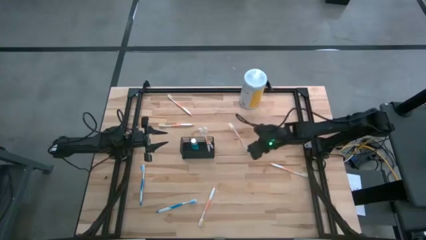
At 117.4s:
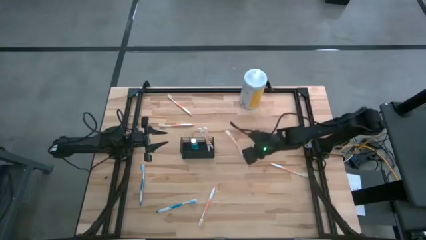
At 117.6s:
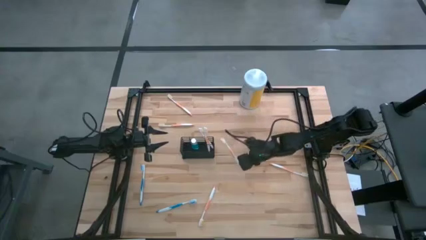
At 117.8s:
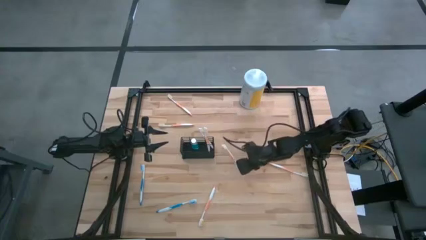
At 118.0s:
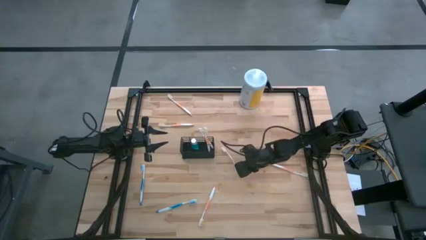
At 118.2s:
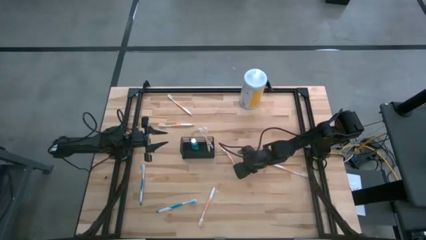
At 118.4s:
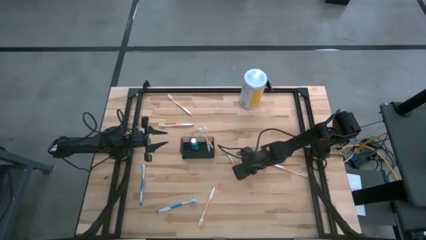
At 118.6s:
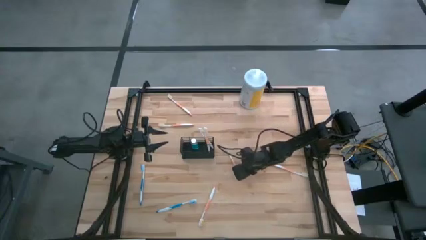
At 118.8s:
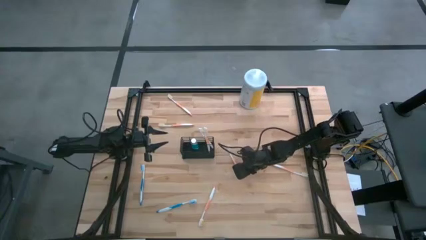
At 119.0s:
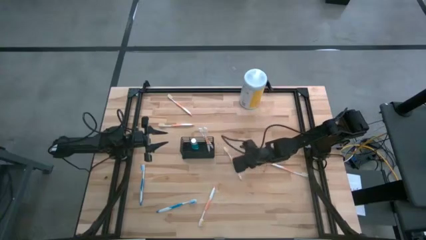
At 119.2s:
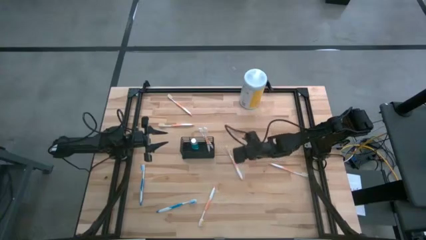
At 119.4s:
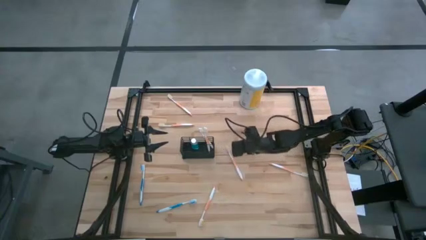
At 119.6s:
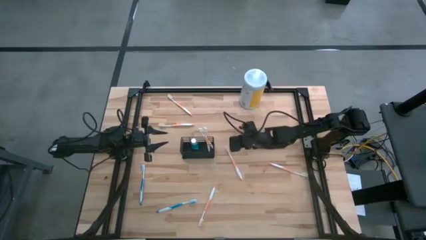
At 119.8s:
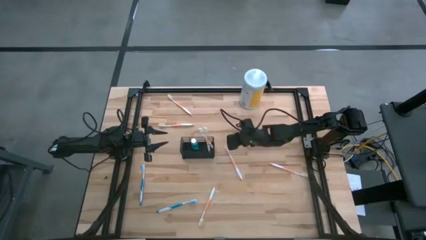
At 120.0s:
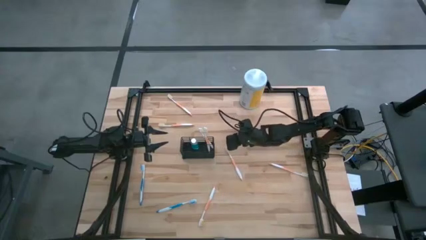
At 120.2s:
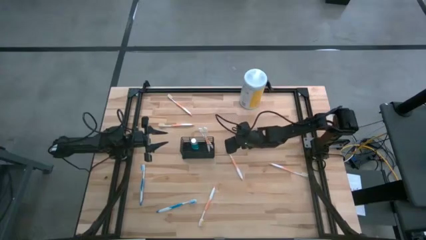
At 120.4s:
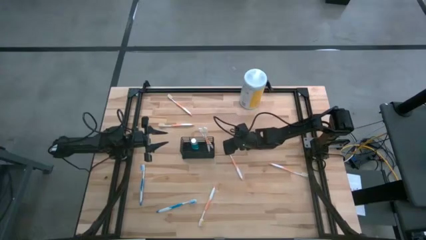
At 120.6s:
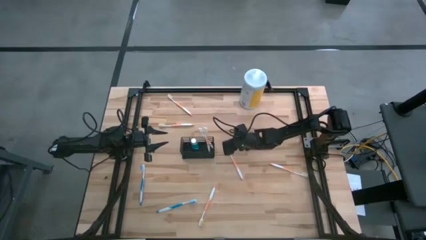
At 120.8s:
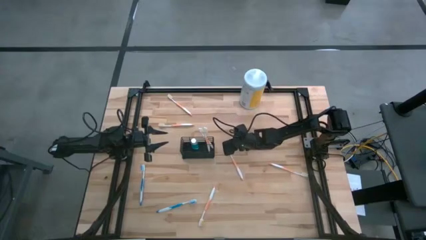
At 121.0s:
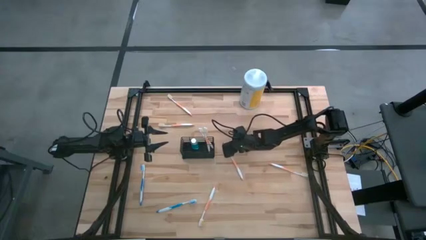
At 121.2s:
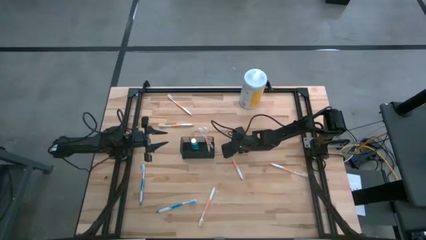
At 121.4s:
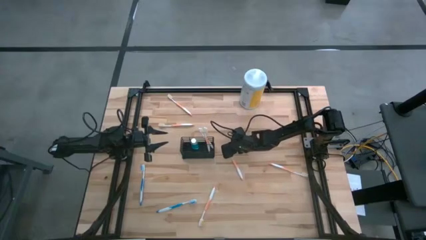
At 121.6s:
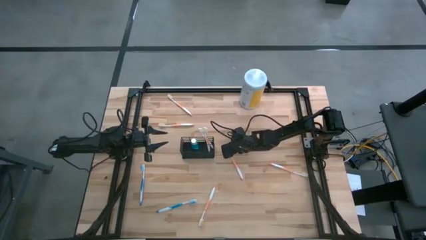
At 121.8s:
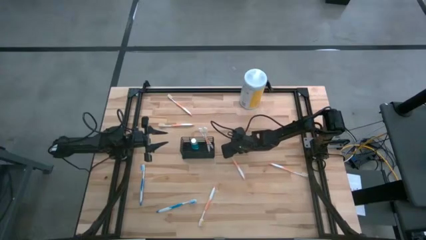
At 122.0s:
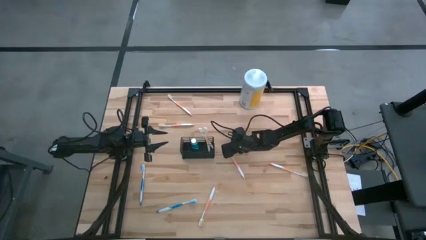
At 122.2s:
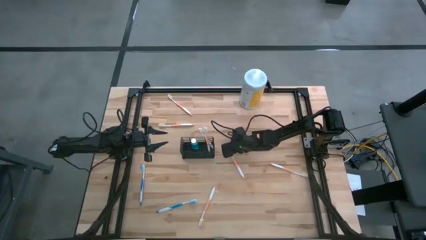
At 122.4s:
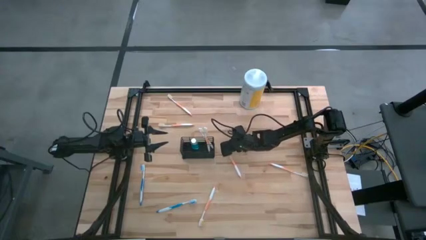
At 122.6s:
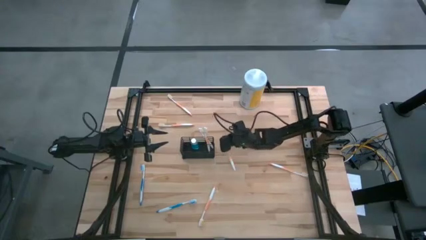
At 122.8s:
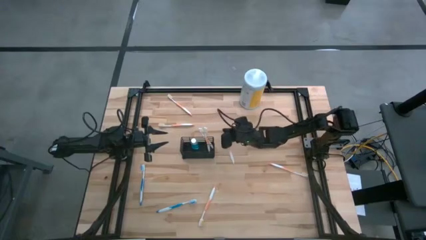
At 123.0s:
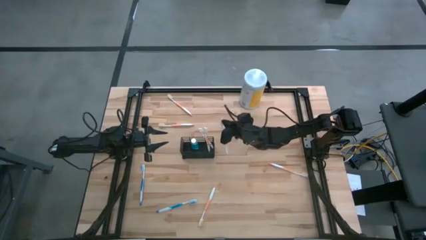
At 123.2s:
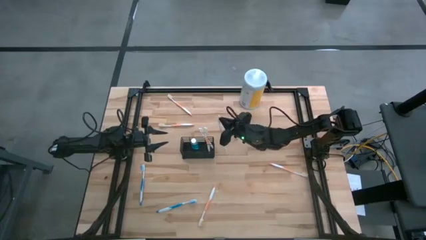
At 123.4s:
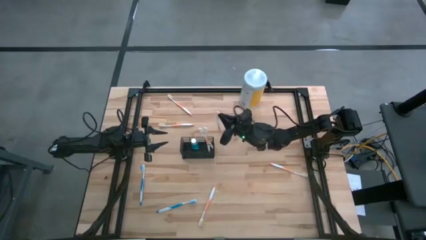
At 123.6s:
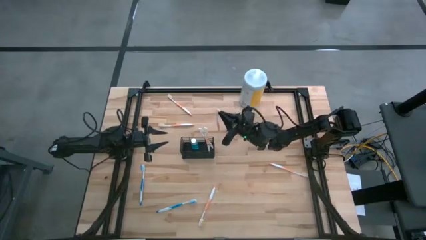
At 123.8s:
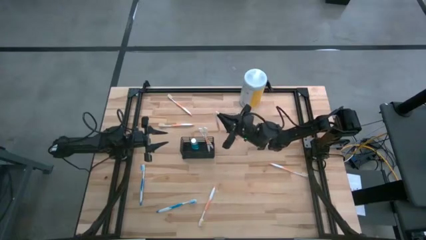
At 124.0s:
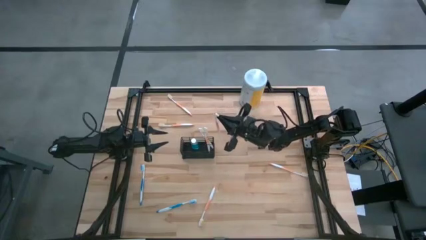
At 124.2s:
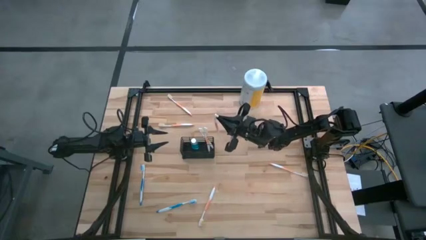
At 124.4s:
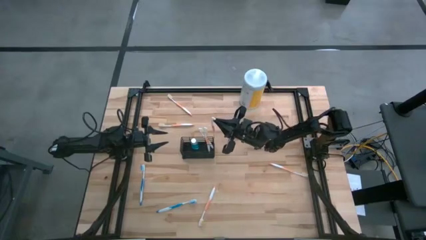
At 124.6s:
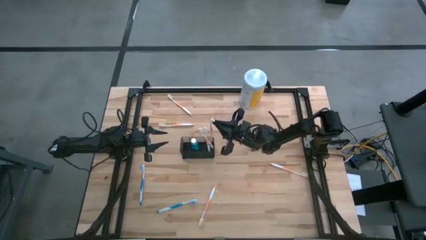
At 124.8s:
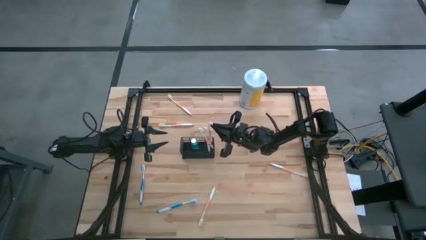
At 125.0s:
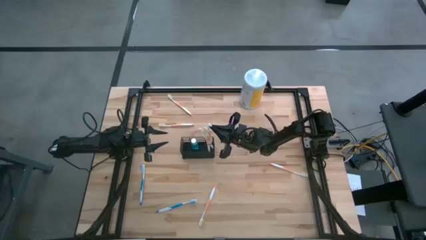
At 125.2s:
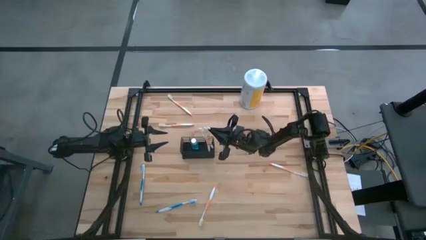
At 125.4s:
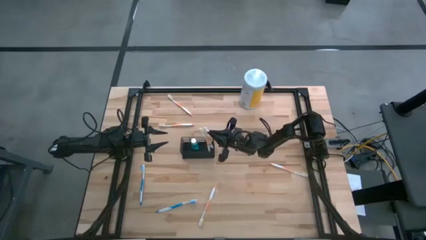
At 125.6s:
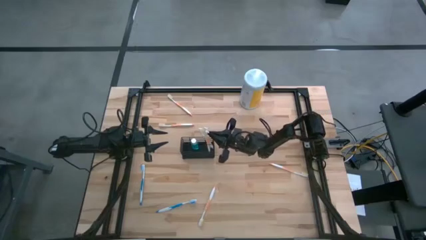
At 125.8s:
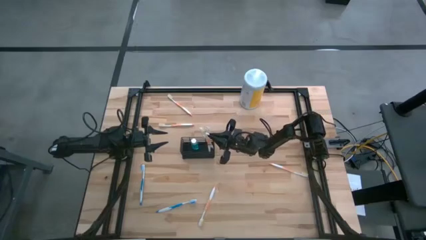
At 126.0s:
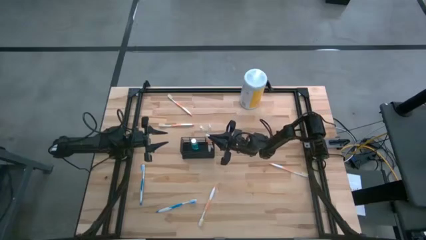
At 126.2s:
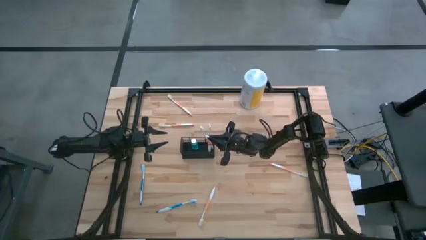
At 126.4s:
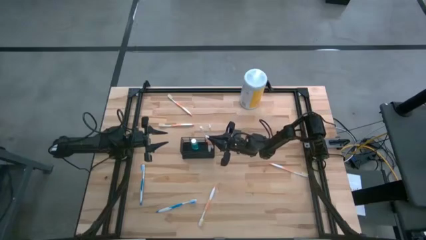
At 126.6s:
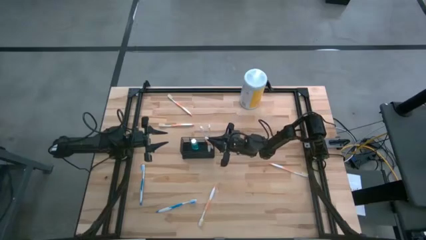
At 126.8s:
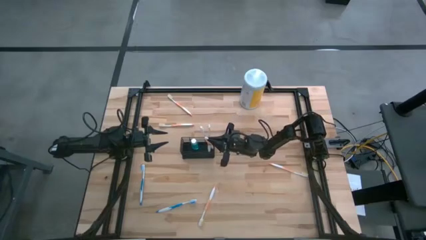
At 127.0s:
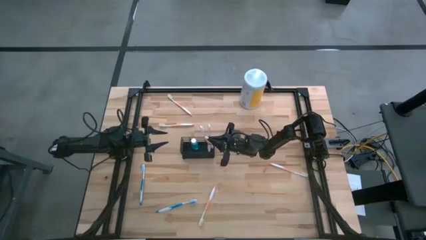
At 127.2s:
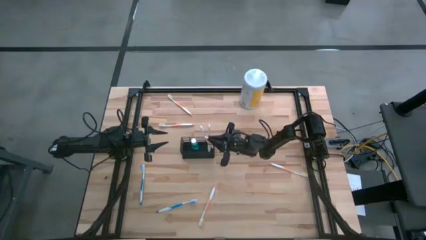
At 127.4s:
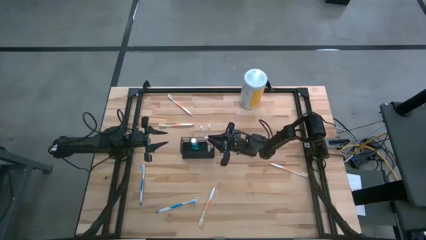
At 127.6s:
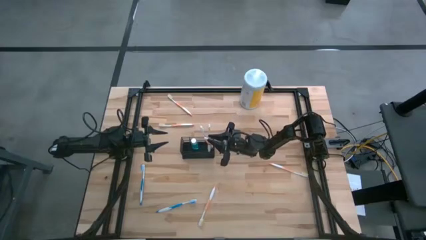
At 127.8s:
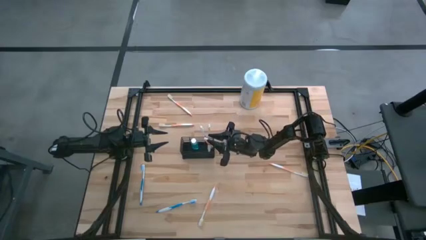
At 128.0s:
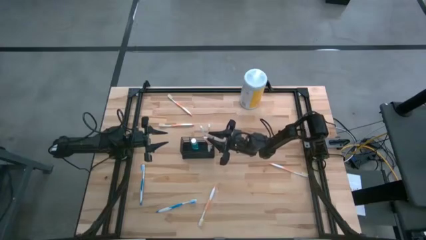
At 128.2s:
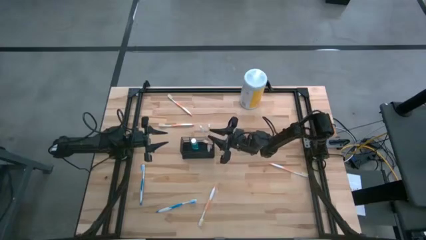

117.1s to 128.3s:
Task: Pick & Place toothbrushing station
Put the orange toothbrush into the right section of the wire organizer

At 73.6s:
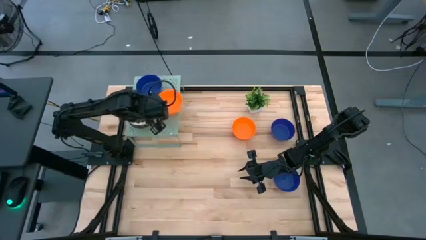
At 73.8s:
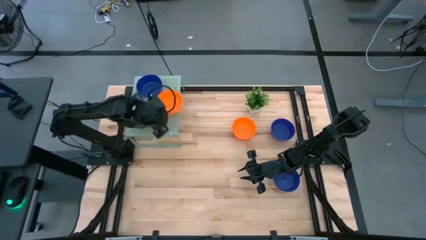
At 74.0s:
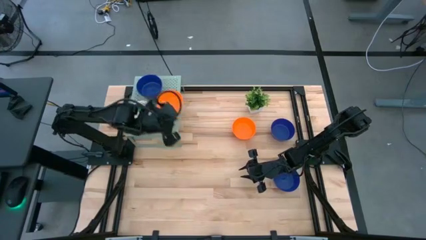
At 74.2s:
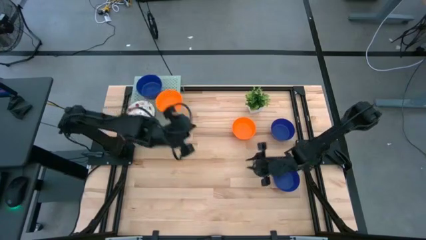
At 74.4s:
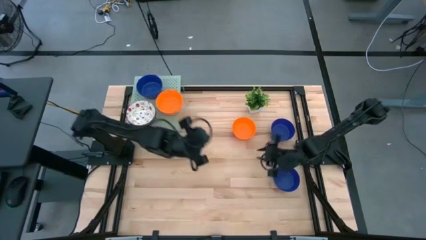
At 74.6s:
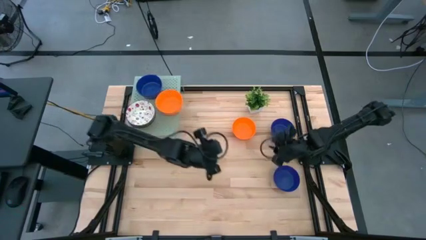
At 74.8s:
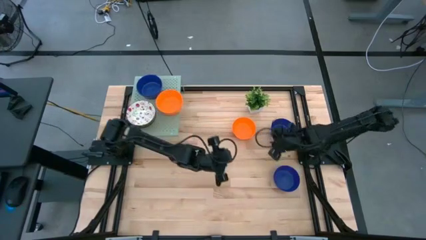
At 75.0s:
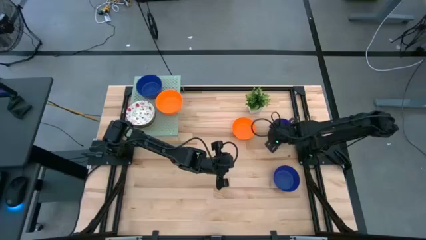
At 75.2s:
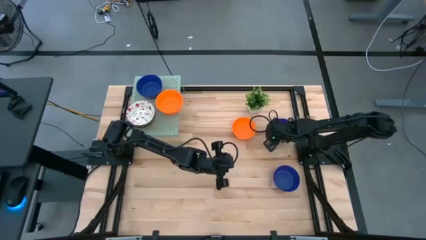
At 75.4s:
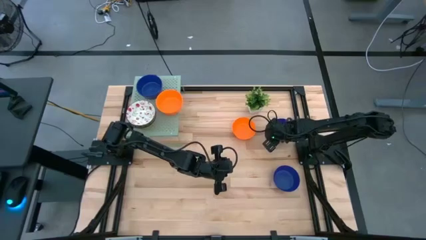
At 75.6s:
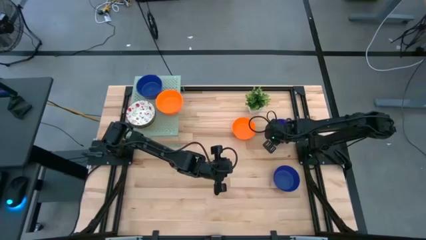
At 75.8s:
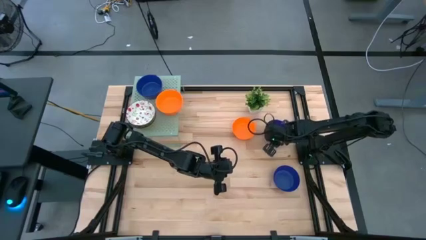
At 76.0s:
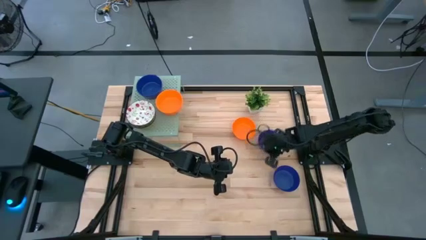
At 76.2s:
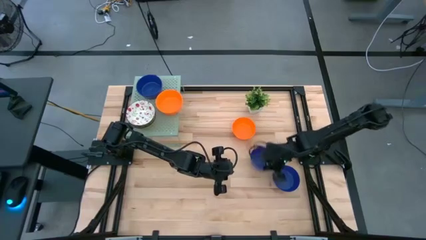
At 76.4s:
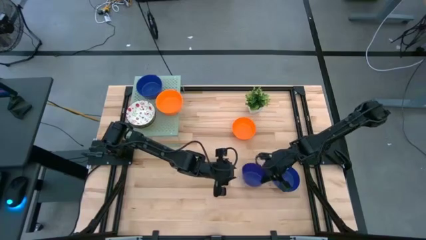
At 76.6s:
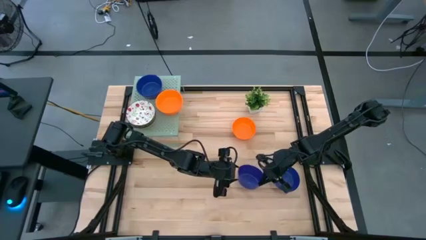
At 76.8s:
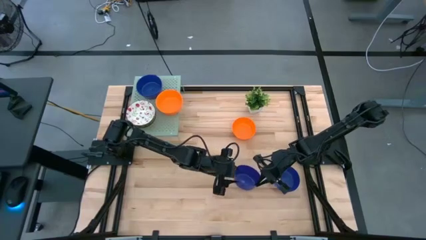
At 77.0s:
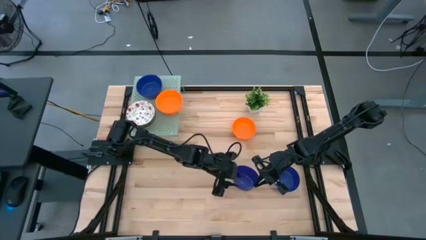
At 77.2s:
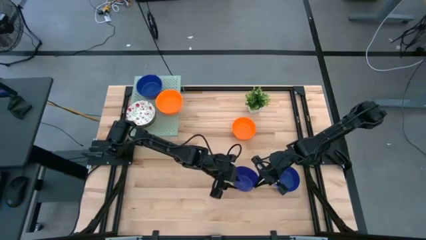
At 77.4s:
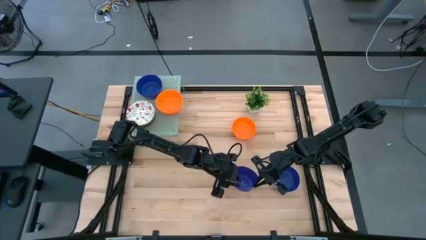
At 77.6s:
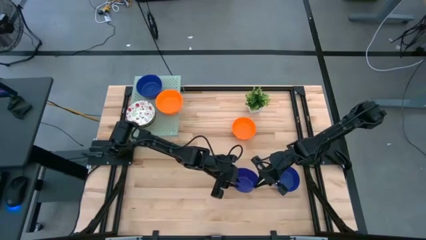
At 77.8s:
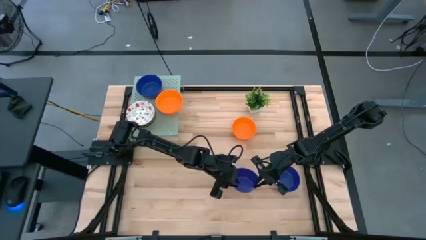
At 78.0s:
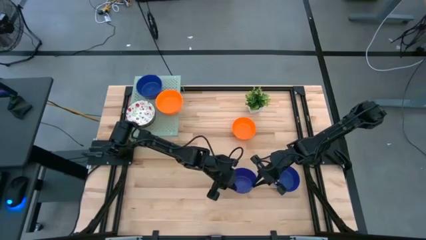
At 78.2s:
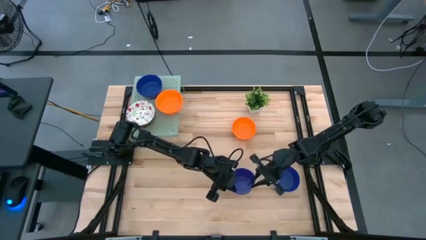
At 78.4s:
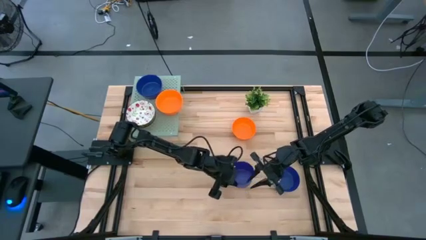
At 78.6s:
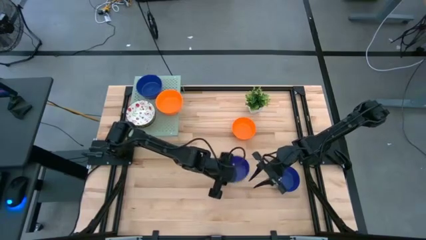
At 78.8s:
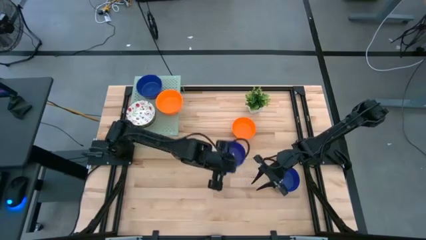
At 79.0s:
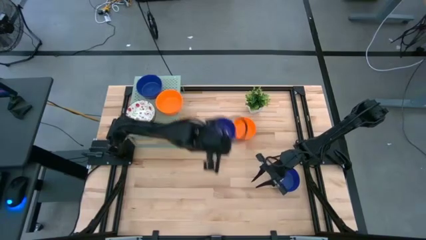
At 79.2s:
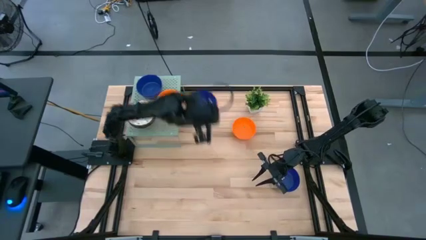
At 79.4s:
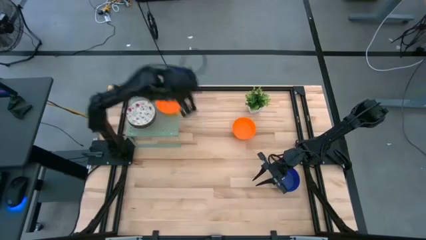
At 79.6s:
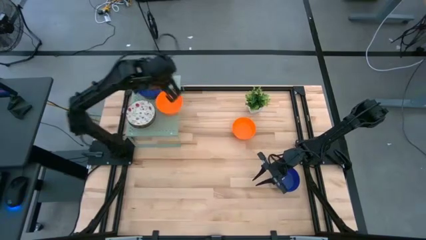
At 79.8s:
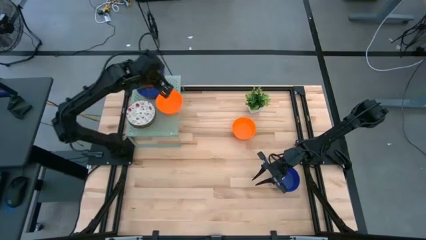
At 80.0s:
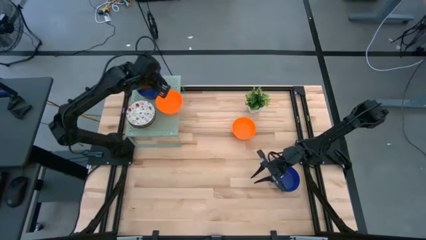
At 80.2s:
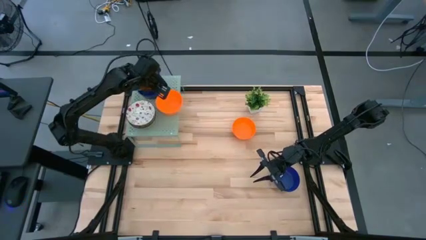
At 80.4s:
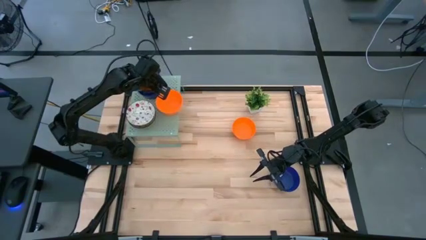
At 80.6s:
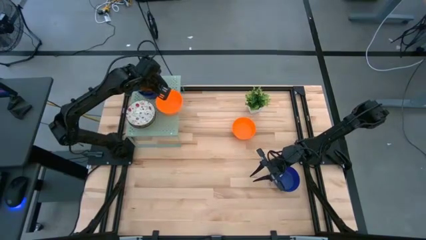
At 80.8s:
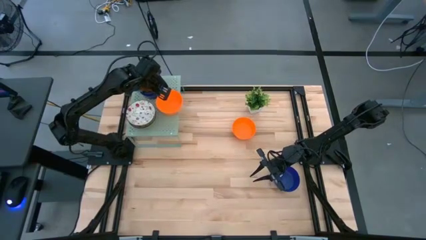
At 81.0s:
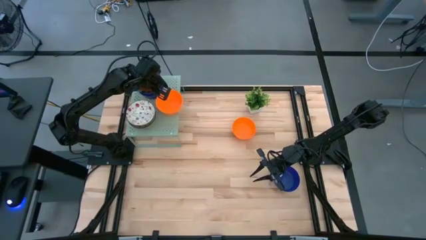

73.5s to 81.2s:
Task: Pick & Place Mini bowls
Stack the blue bowl on the blue bowls on the shelf
